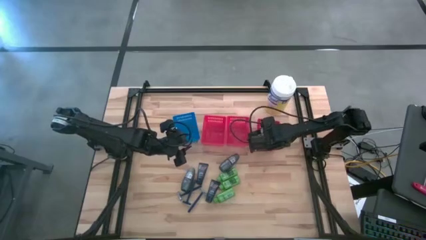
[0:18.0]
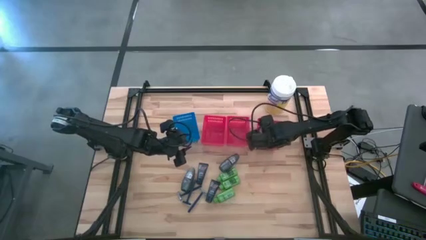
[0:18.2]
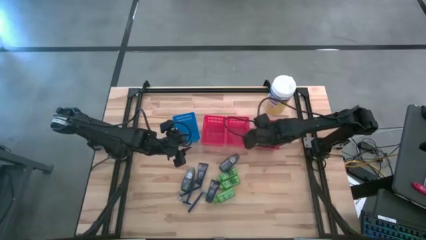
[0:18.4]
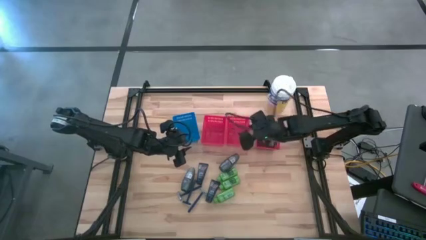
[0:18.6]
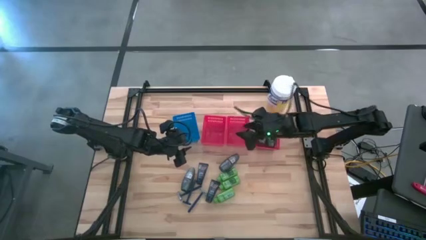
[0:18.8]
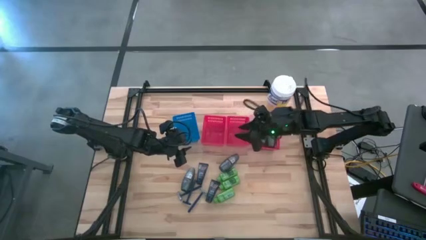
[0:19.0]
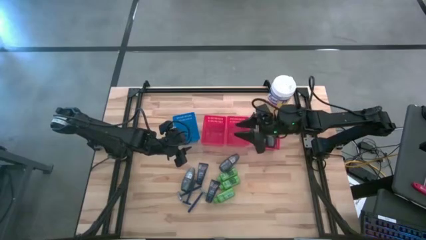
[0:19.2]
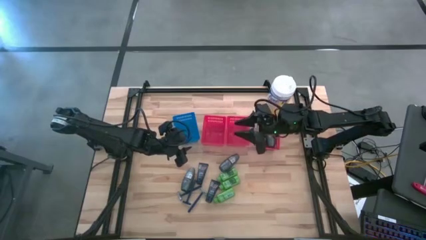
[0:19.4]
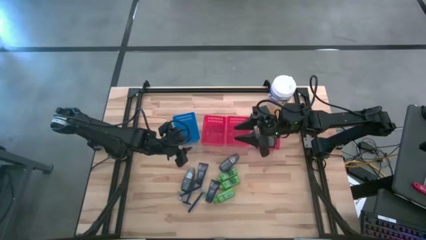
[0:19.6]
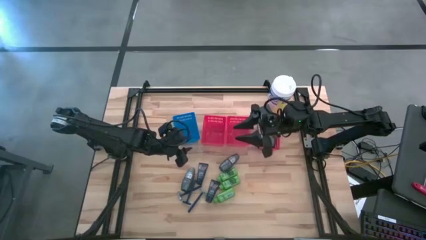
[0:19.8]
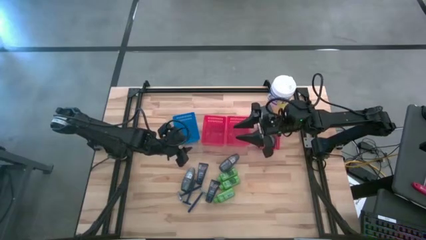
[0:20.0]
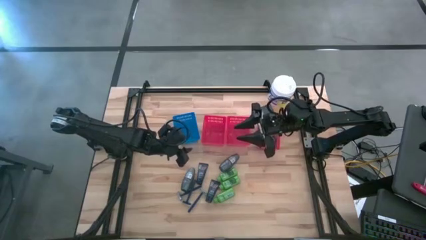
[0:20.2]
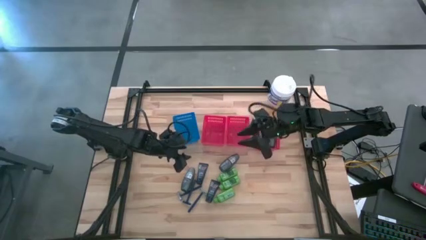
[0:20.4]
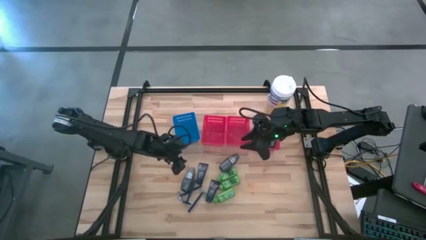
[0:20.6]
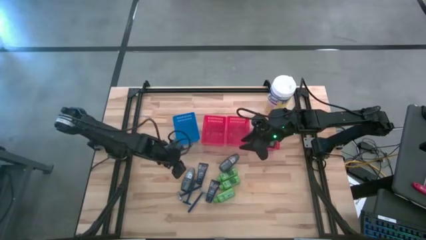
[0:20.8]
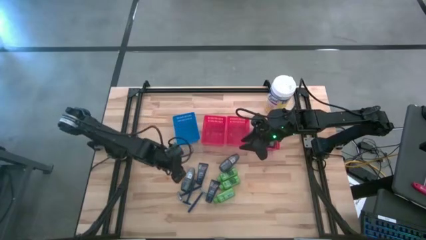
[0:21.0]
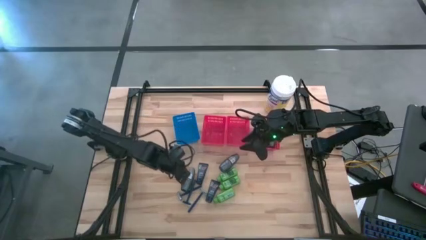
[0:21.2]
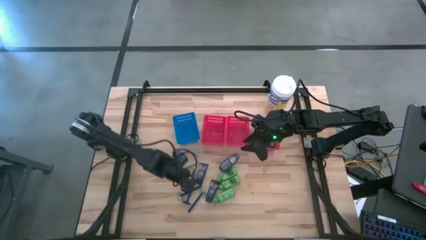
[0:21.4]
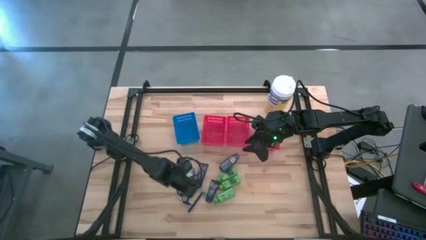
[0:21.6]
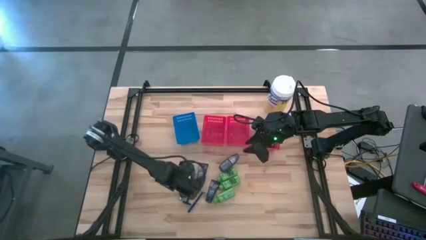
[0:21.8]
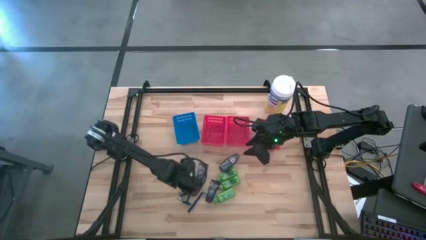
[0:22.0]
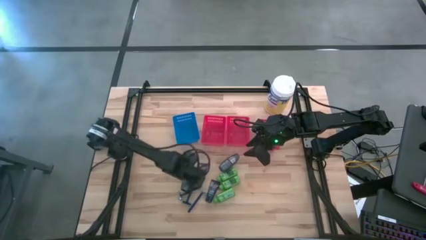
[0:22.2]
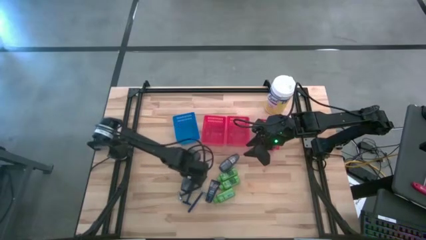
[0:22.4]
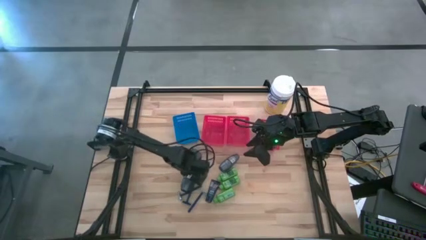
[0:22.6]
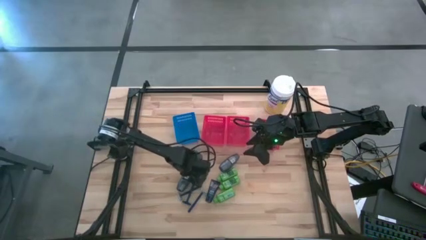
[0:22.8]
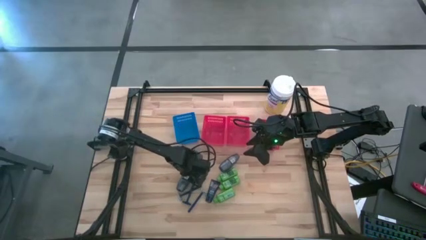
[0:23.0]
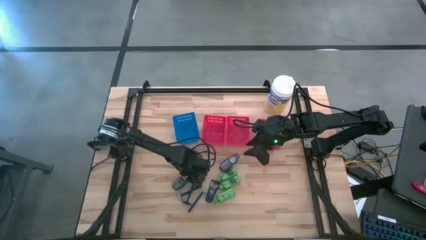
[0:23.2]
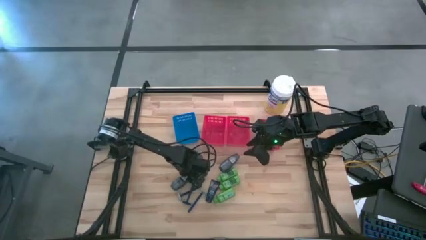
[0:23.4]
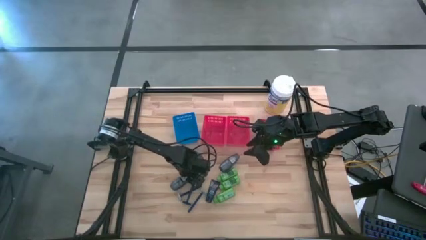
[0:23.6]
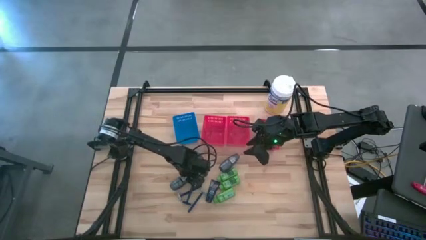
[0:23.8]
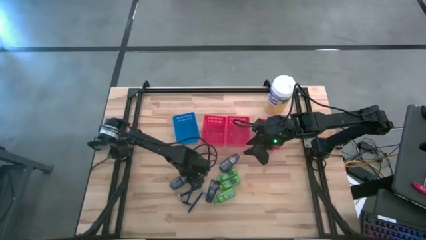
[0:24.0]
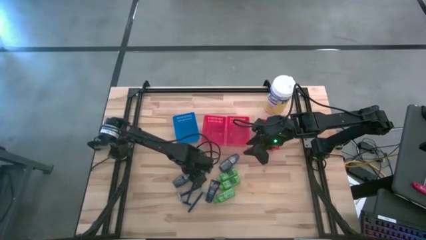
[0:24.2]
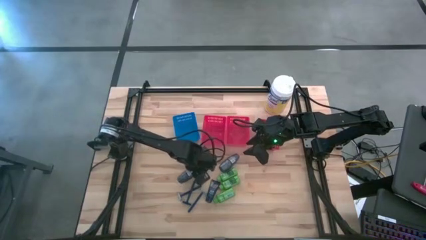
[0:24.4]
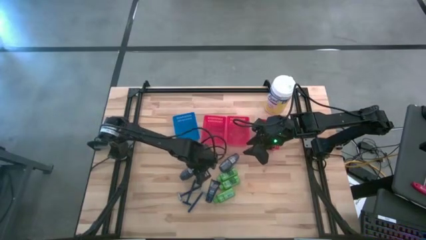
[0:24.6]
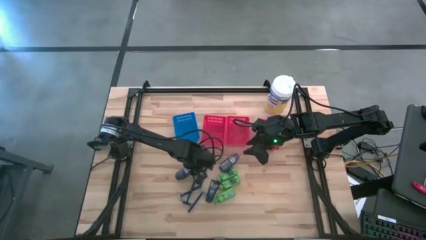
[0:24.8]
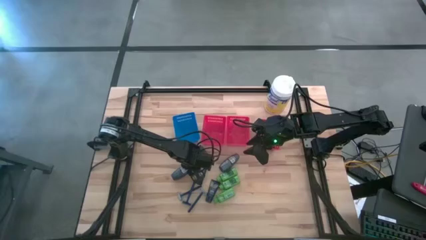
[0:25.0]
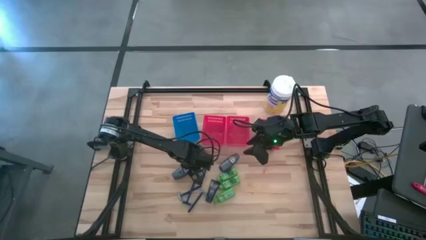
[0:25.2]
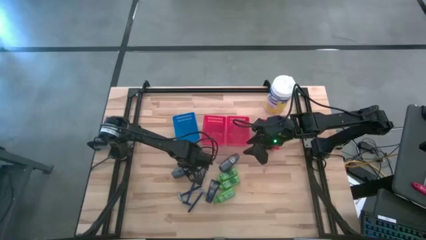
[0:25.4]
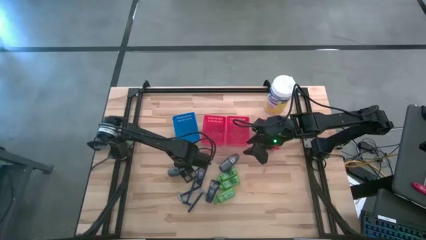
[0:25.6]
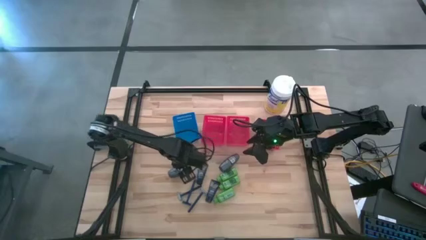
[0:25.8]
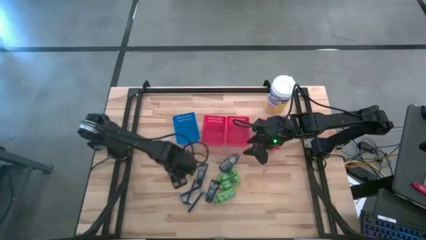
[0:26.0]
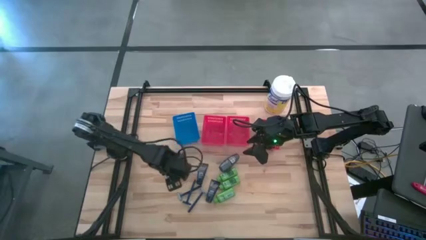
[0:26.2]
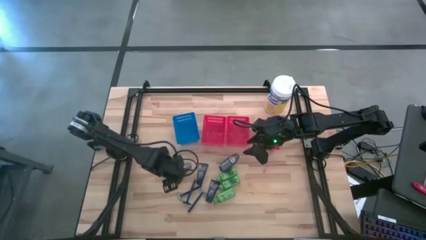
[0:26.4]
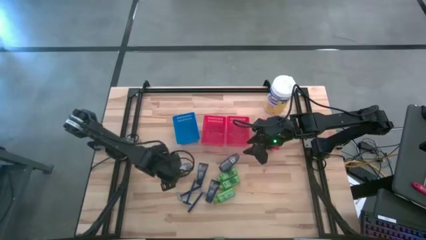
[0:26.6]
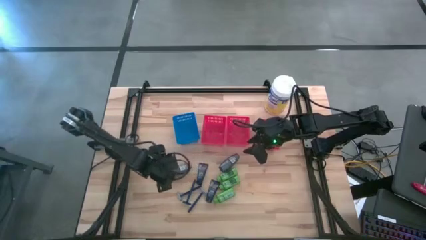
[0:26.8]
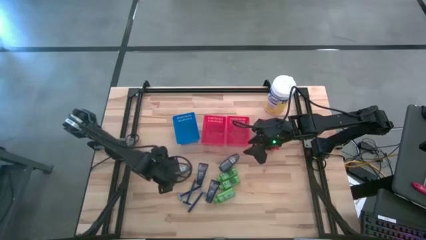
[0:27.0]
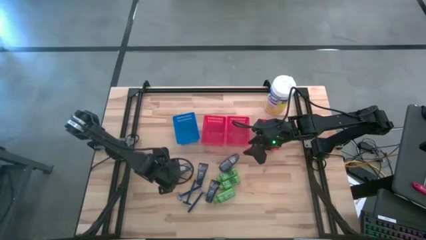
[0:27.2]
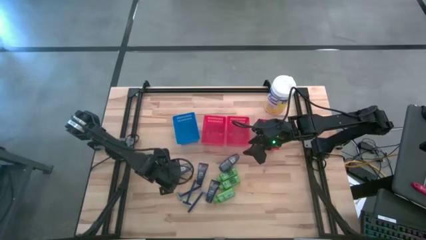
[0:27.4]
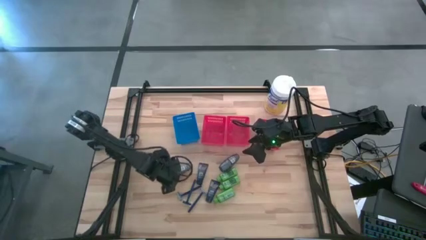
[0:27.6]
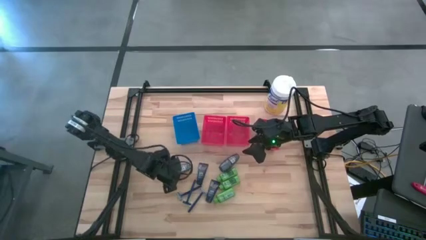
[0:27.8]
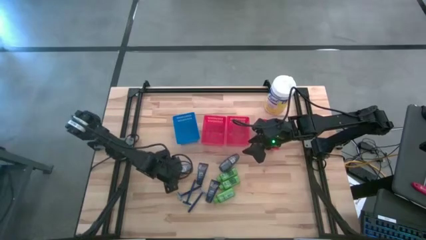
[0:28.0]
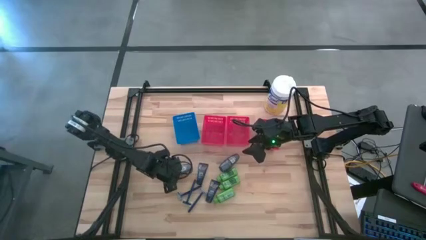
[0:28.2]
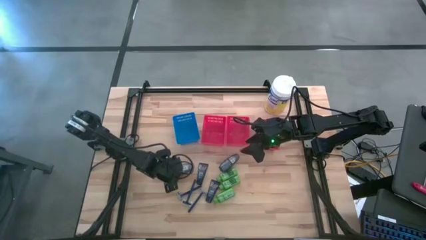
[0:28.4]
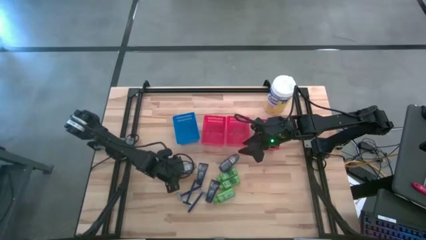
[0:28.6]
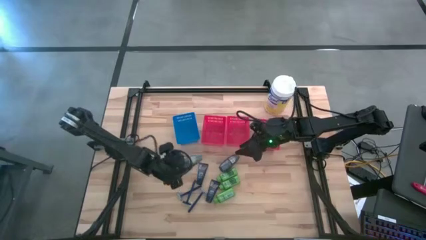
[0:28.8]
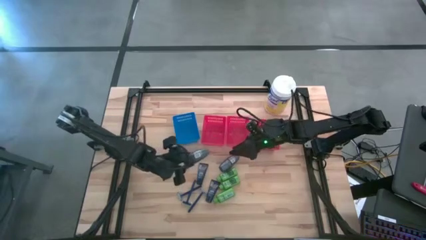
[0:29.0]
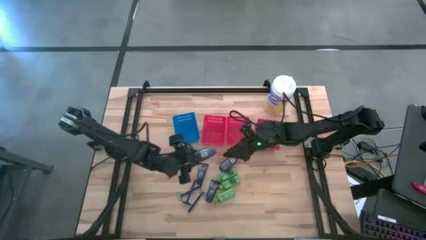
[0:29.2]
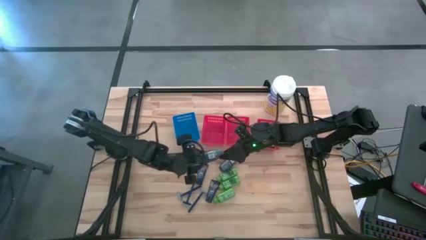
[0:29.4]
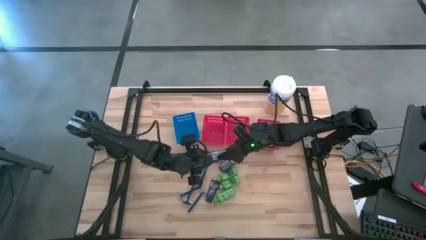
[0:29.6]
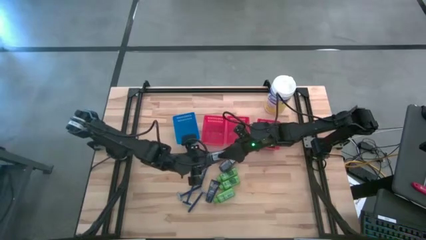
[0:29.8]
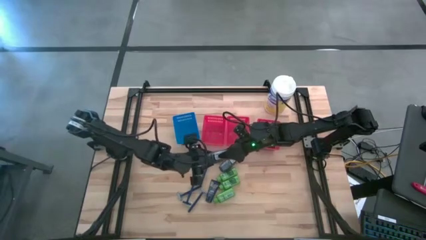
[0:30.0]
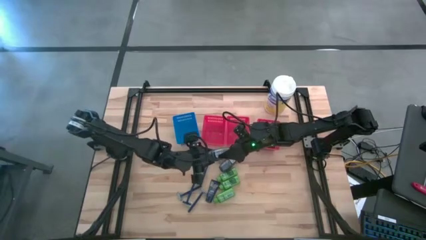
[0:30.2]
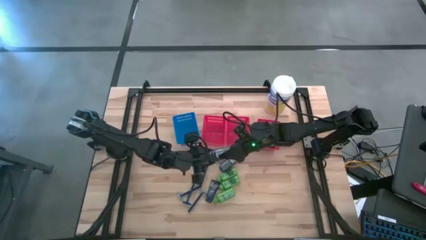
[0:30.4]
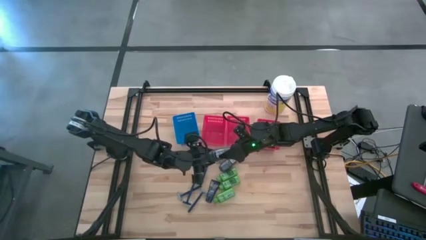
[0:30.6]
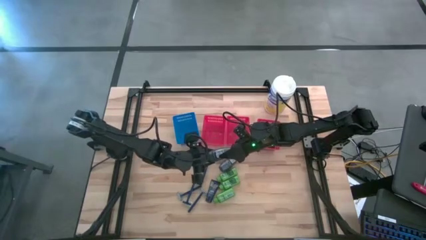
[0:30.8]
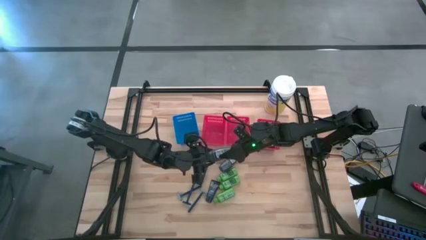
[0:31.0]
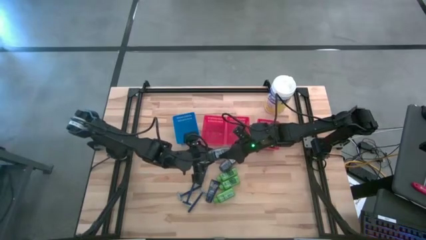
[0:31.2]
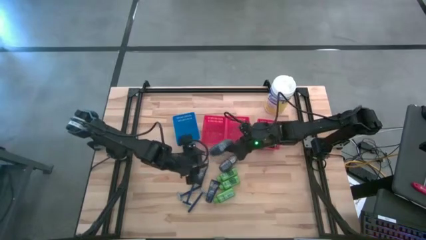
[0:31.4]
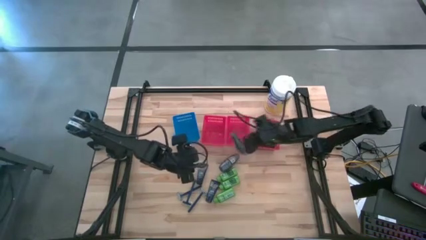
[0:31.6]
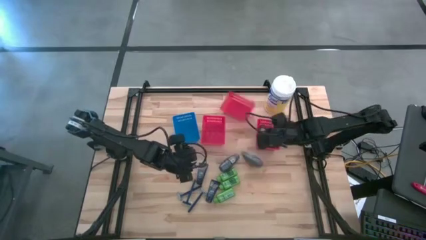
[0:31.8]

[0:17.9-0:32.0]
Task: Pick & Place Travel size toiletries
Put the deodorant into the right red bin

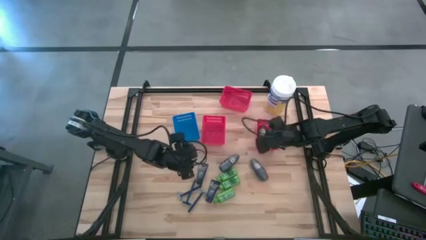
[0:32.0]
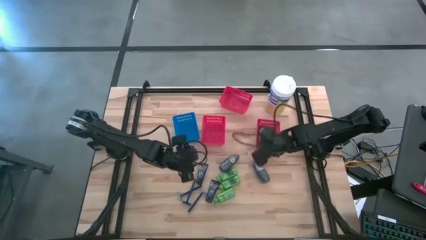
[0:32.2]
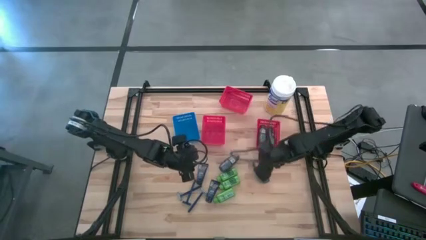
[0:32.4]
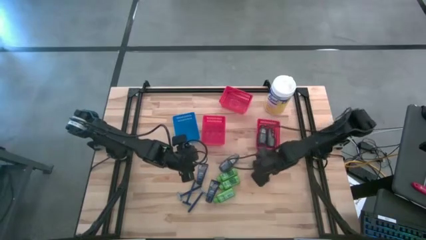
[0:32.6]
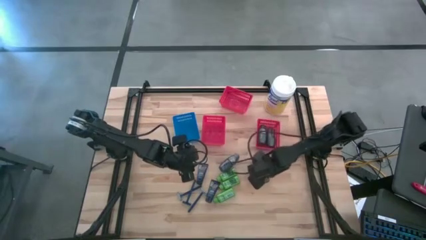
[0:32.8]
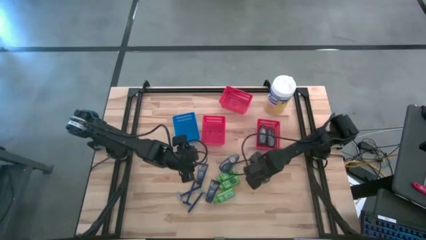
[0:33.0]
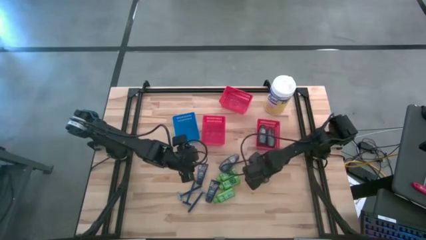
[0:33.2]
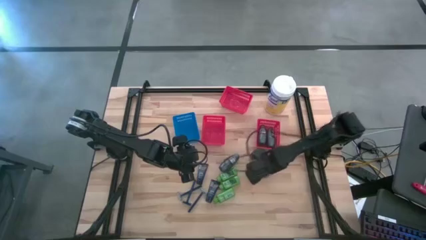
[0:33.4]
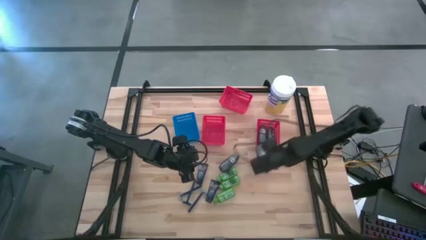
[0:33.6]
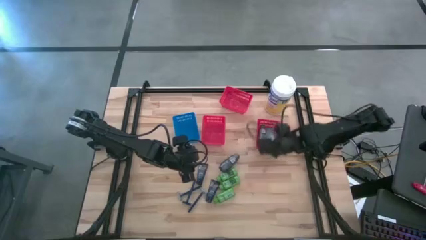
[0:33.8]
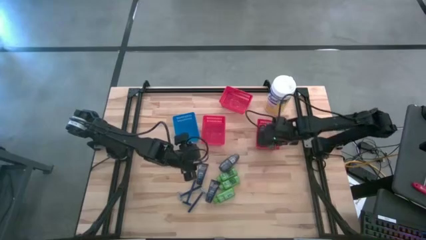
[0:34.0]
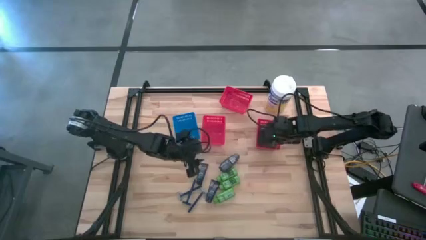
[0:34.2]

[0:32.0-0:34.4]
Put the deodorant into the right red bin
